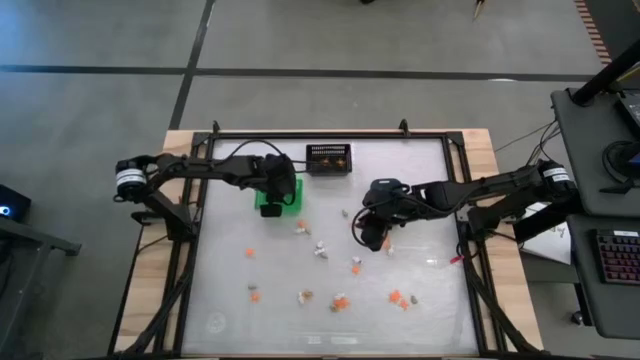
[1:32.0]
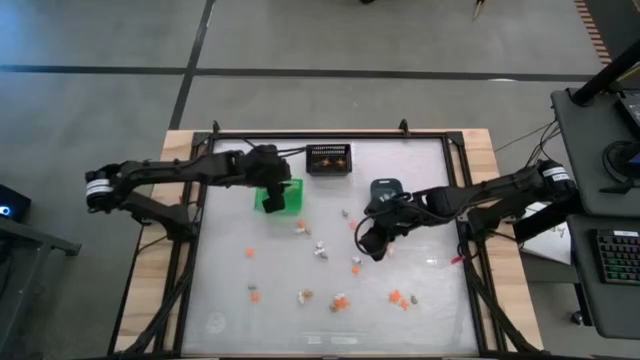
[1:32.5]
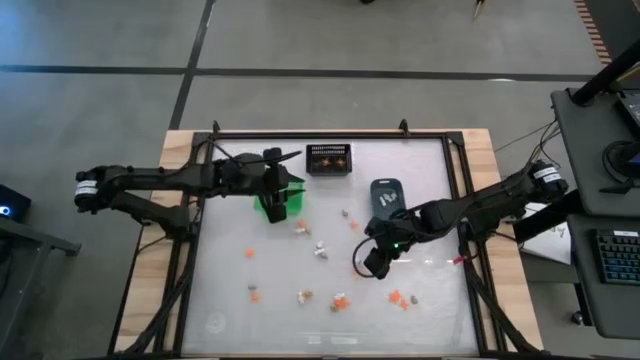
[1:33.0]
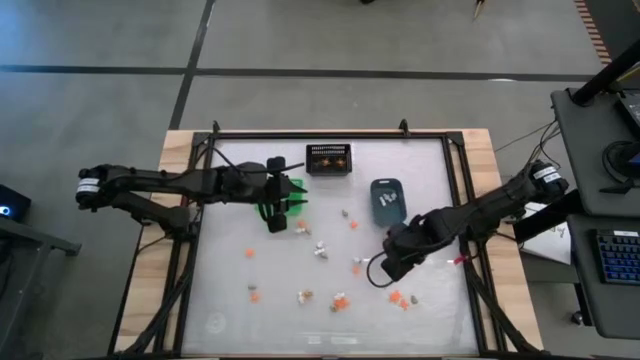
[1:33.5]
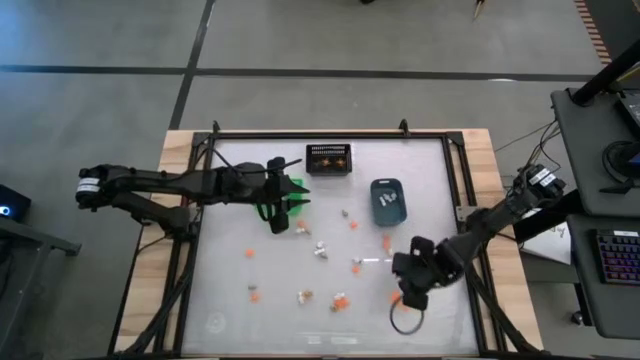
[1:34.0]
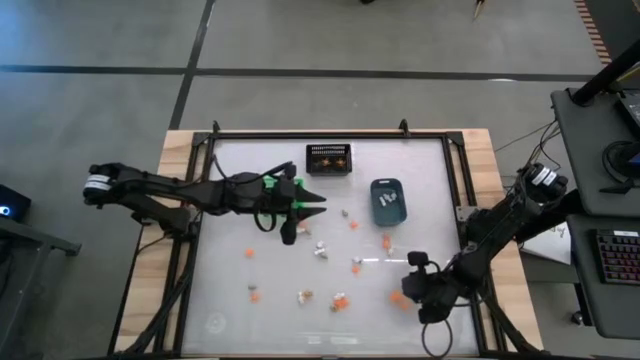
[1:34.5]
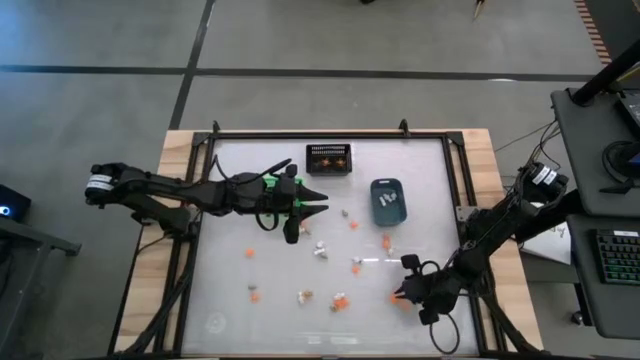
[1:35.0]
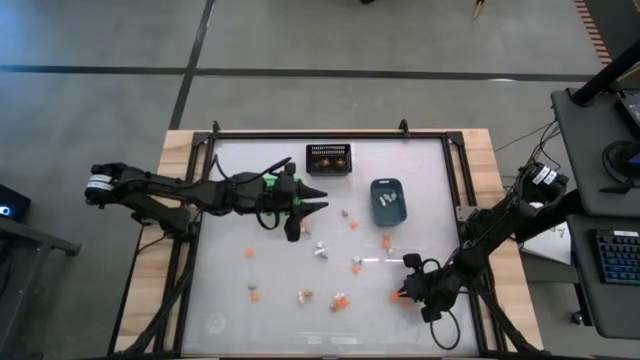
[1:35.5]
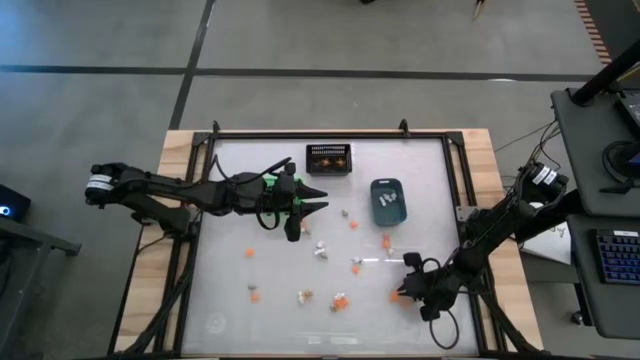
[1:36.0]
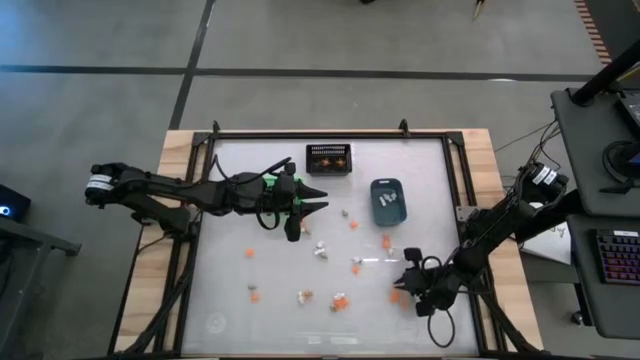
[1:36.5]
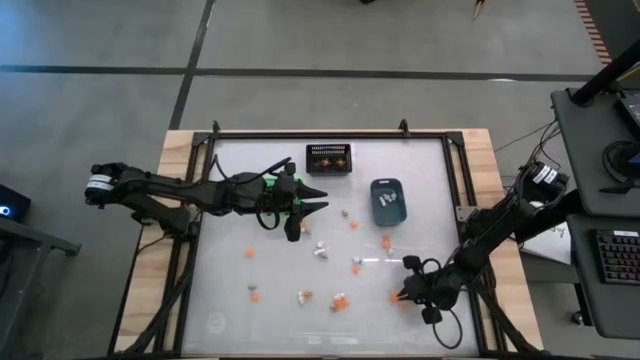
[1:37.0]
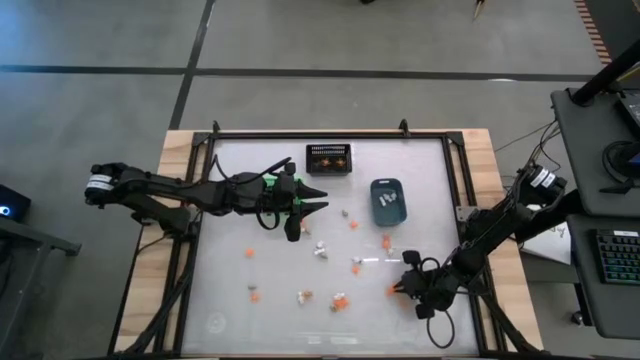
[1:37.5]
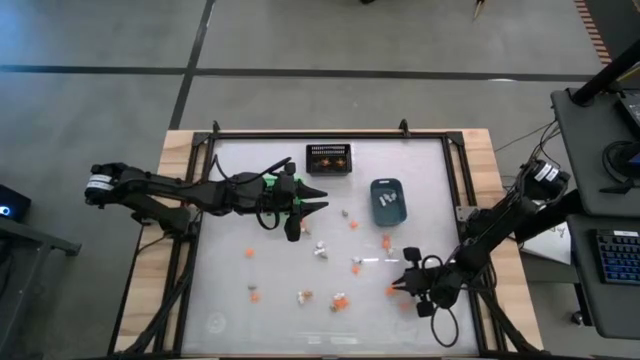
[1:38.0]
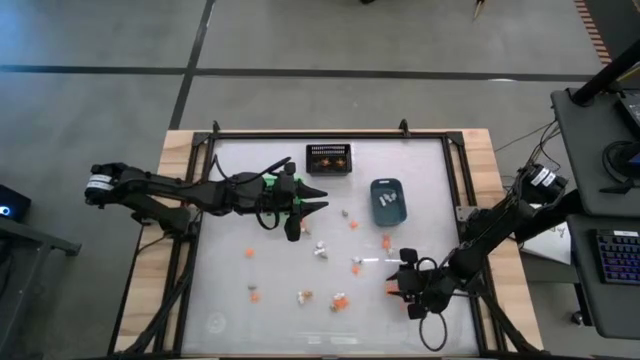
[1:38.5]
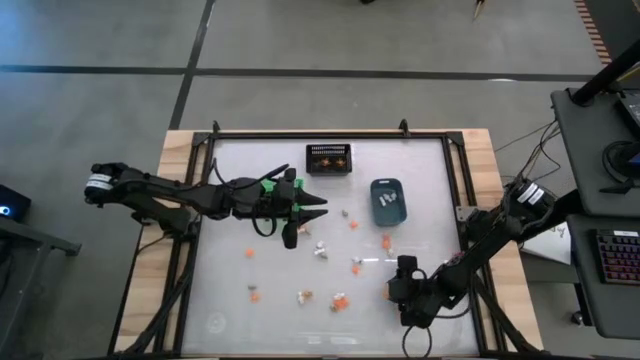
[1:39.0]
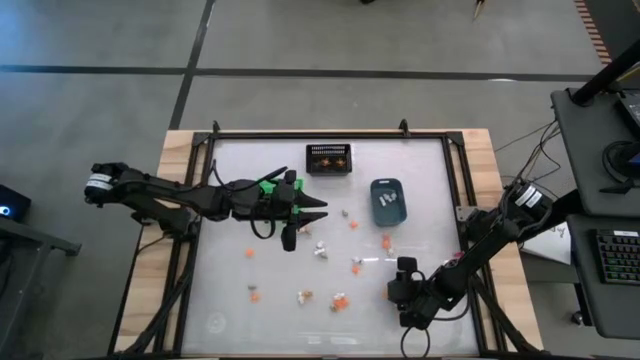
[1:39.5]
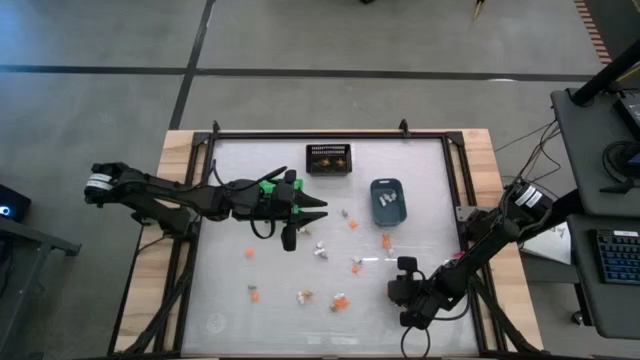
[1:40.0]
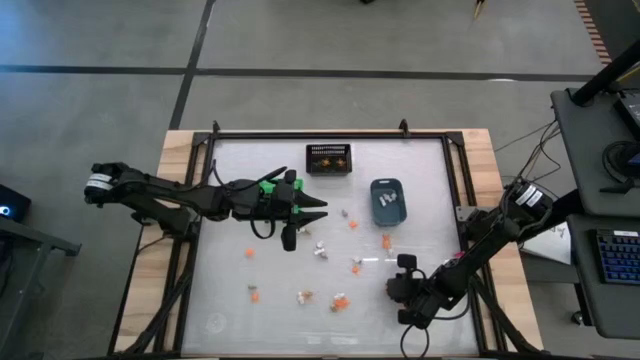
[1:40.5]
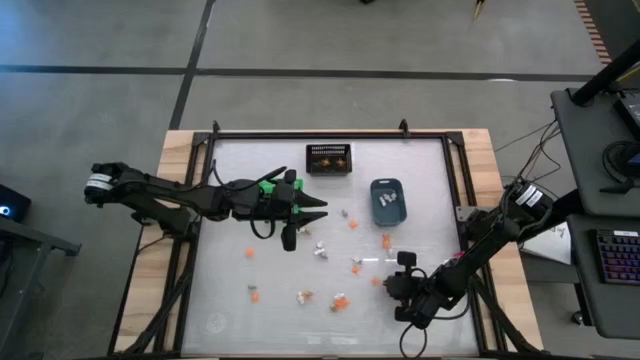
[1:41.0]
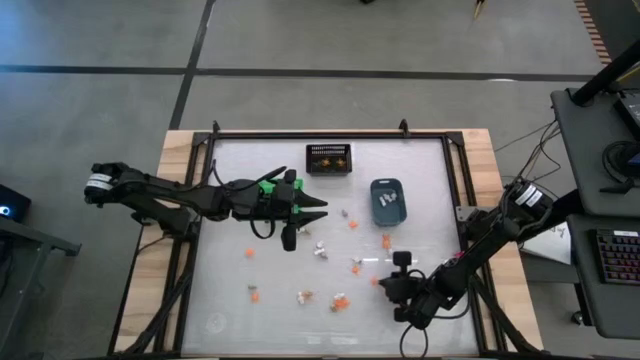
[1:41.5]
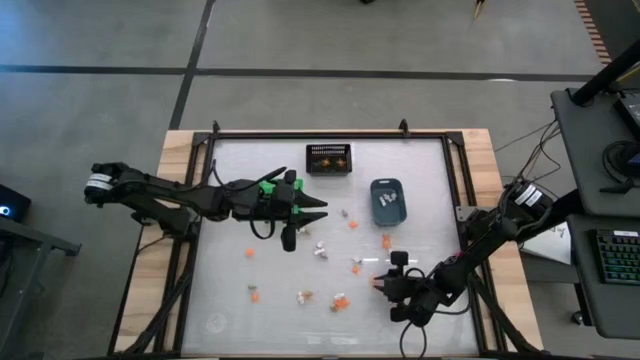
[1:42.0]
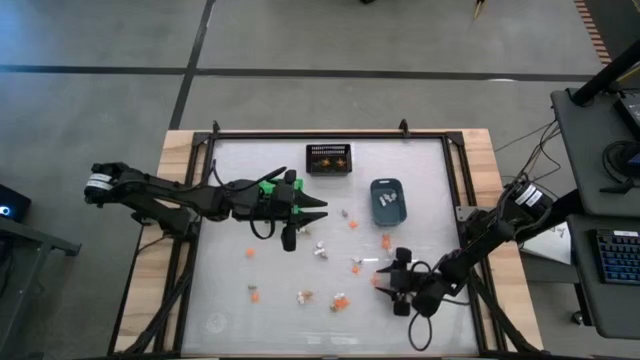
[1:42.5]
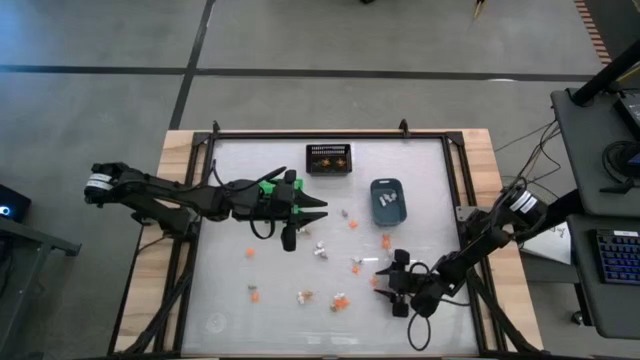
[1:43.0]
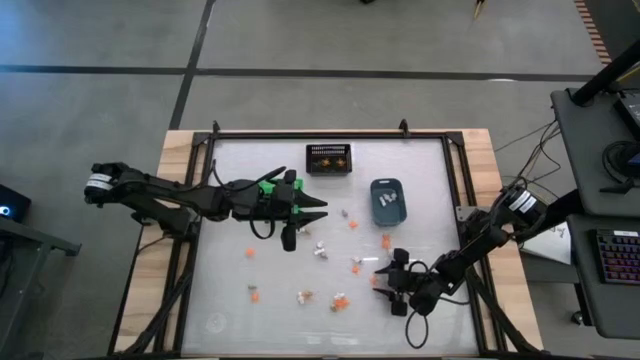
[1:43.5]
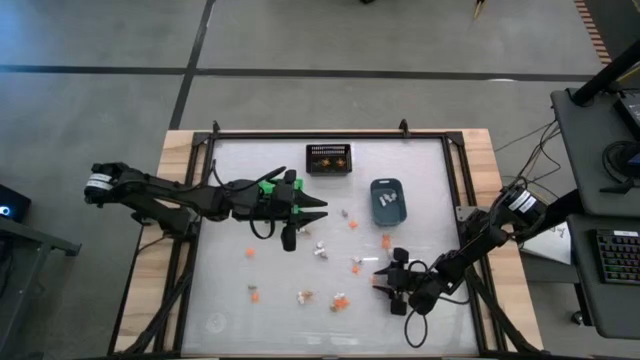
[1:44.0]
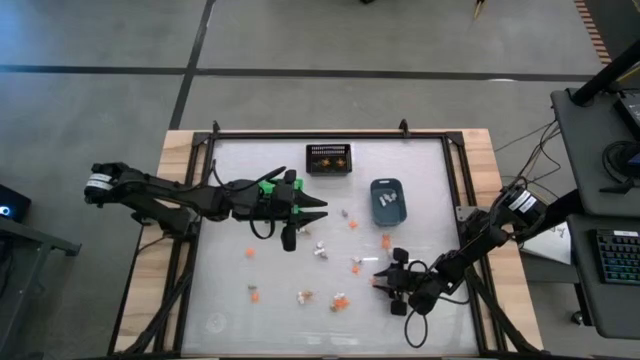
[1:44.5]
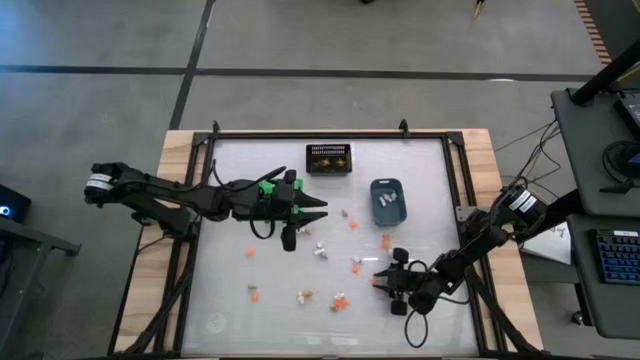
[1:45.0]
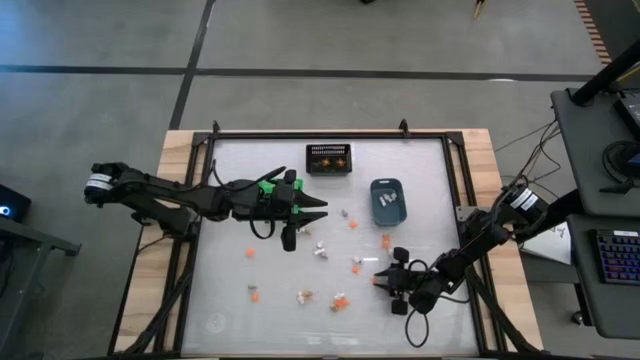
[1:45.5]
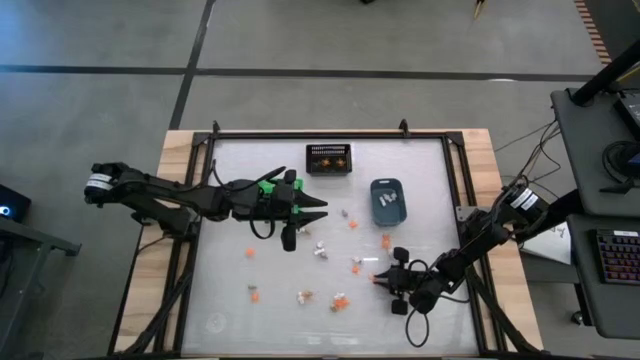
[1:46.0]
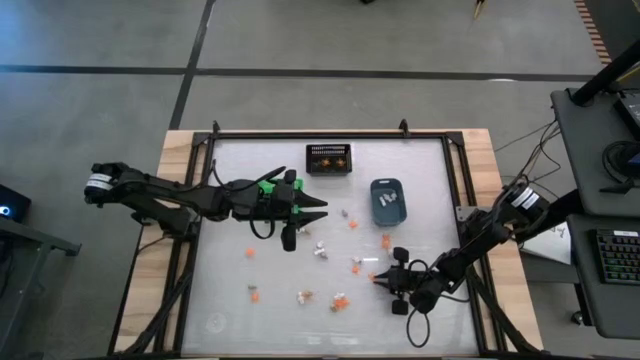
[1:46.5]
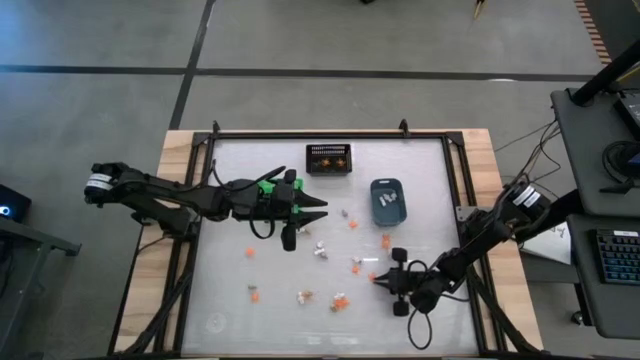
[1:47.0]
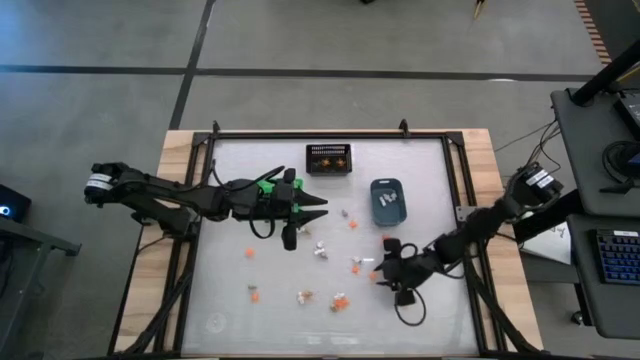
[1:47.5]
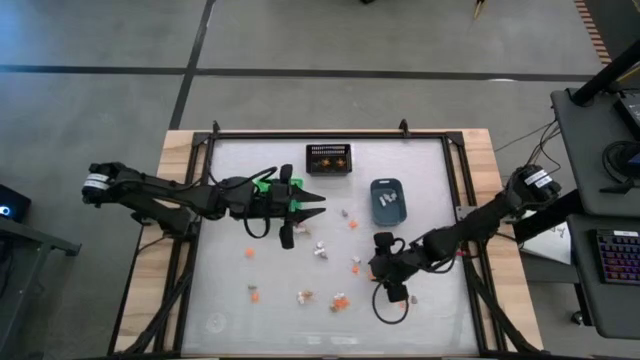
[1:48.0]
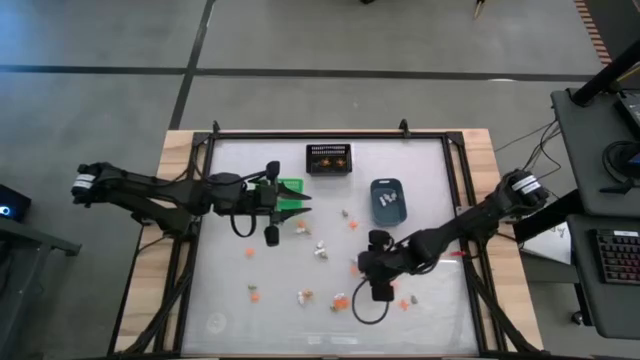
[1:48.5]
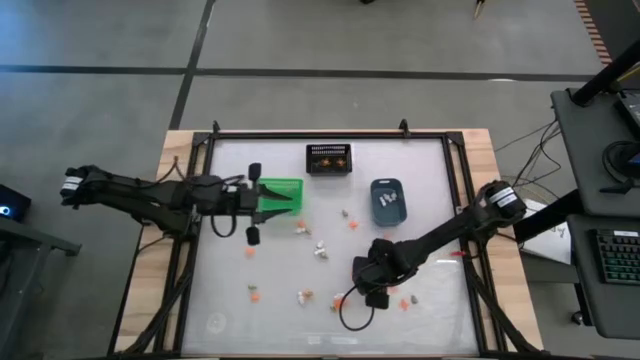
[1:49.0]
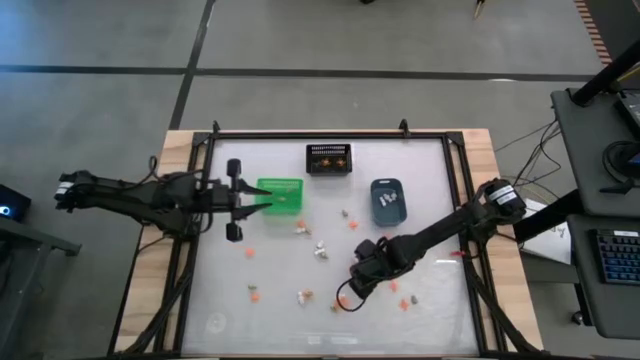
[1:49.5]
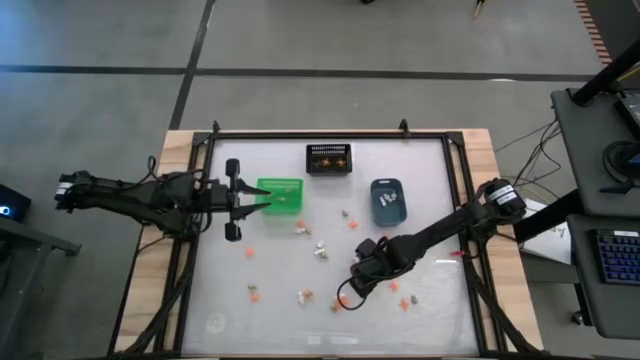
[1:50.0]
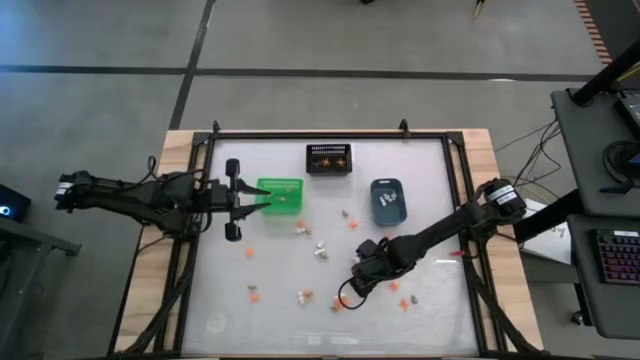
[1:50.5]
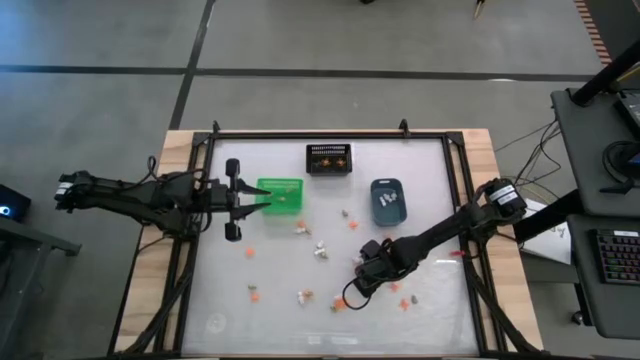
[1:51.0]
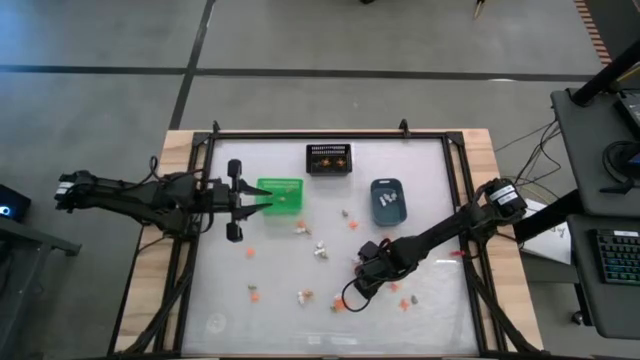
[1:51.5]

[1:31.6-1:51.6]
Task: Sort Halloween decoration
Put the orange spider toy into the black bin

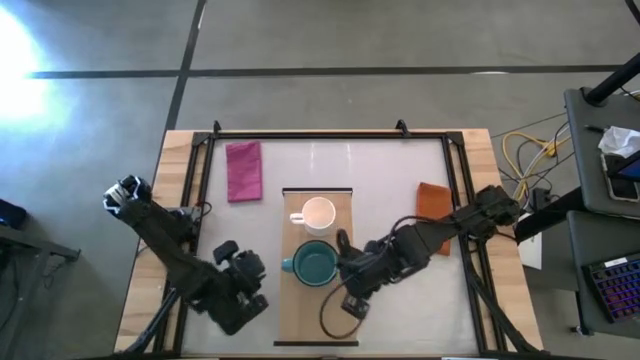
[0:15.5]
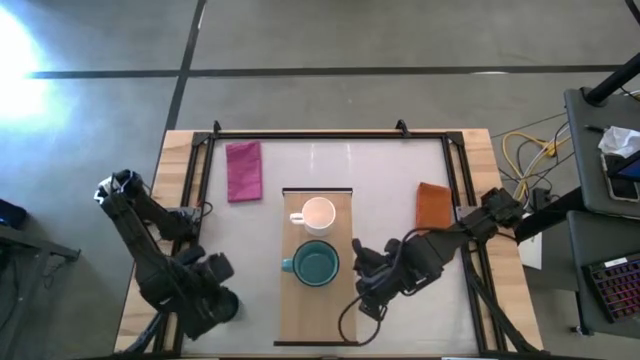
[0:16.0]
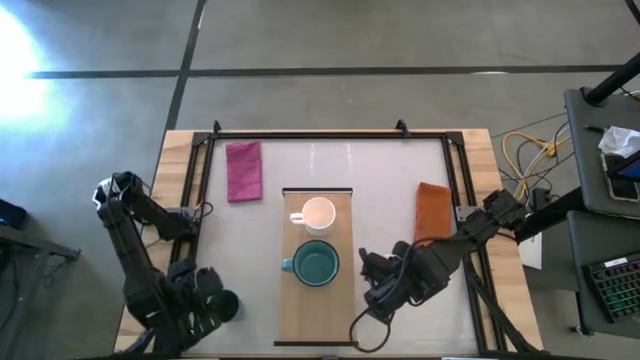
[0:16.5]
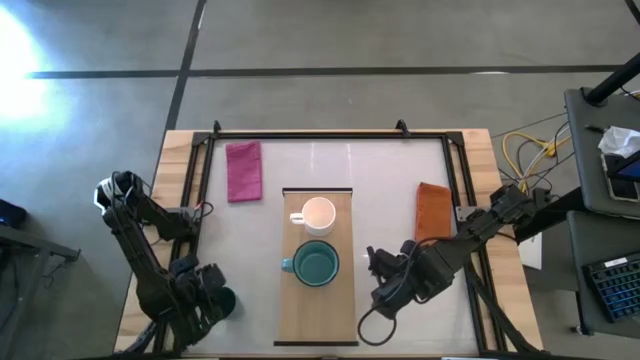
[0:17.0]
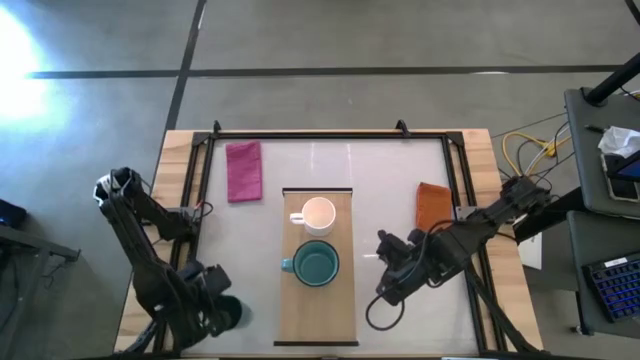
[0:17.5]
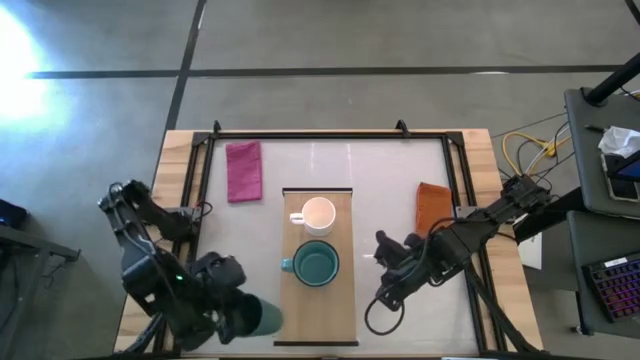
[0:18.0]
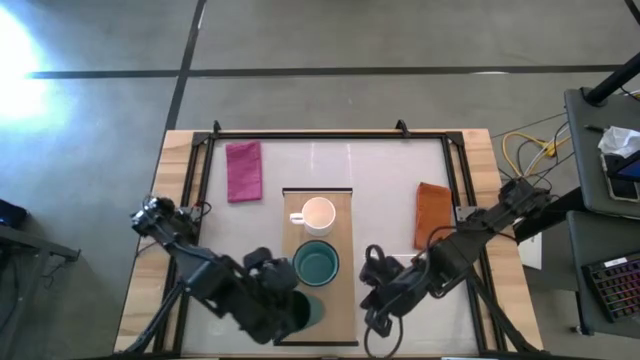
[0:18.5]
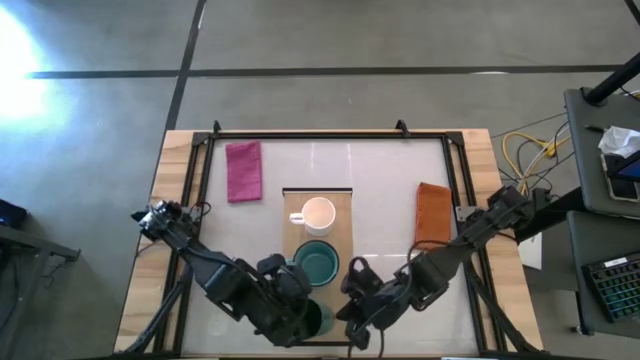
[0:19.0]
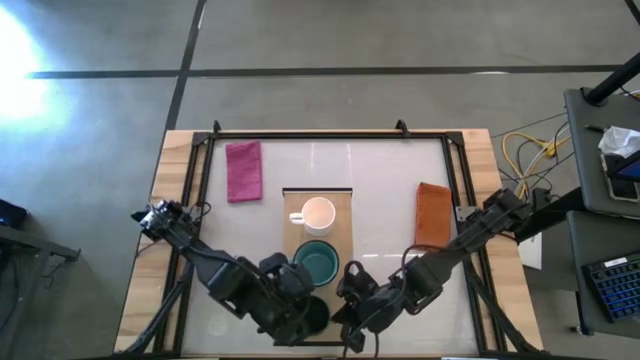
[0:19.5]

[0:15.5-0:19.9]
Task: Stack small to large cups/mugs on shelf
Put the blue cup on the shelf
